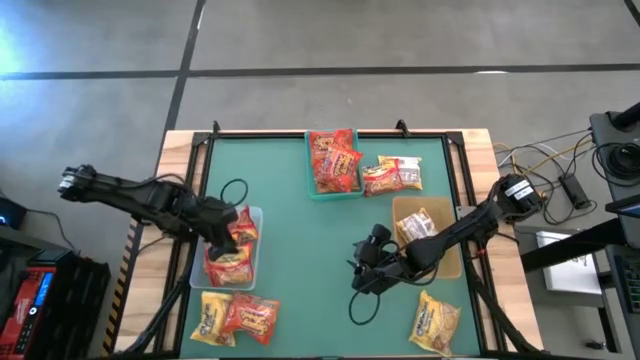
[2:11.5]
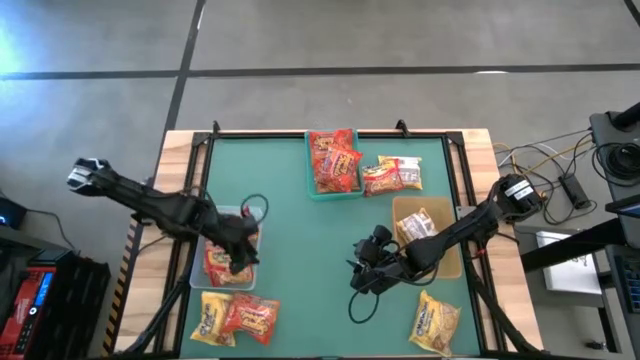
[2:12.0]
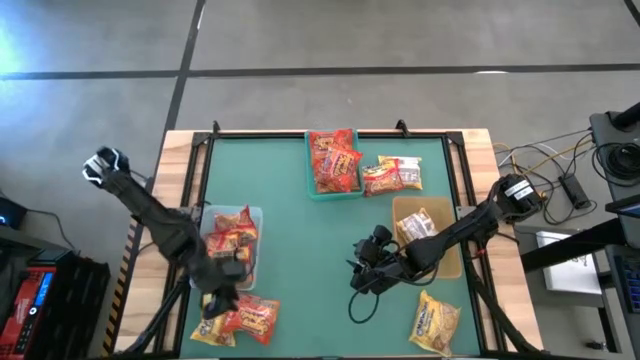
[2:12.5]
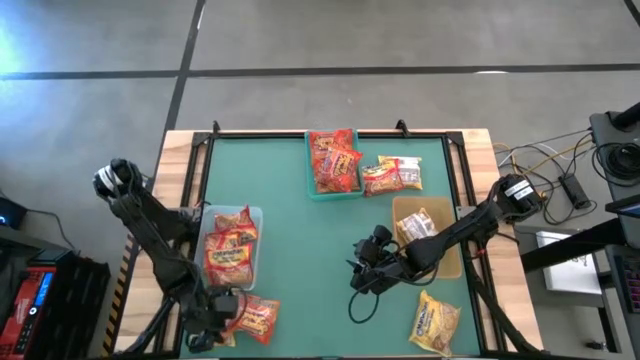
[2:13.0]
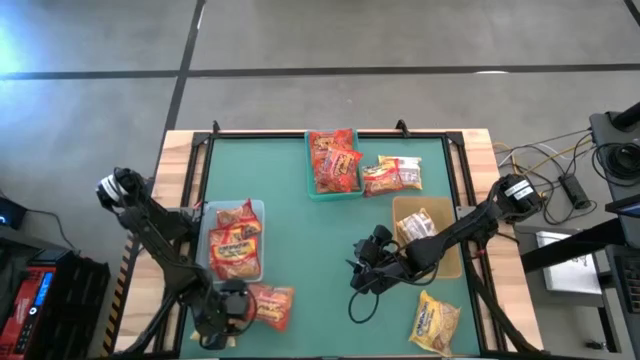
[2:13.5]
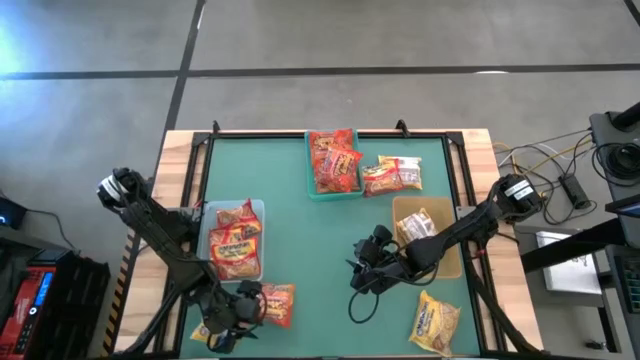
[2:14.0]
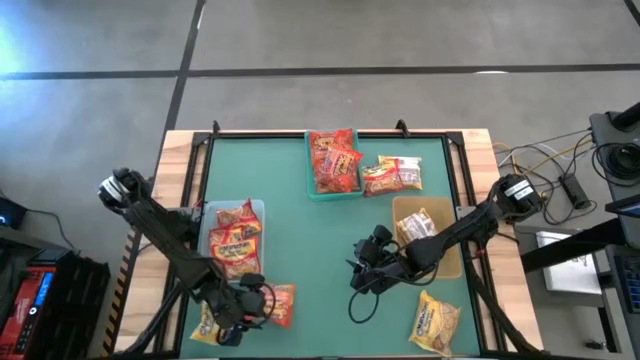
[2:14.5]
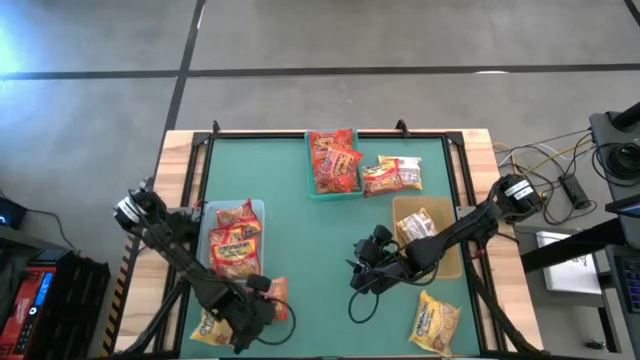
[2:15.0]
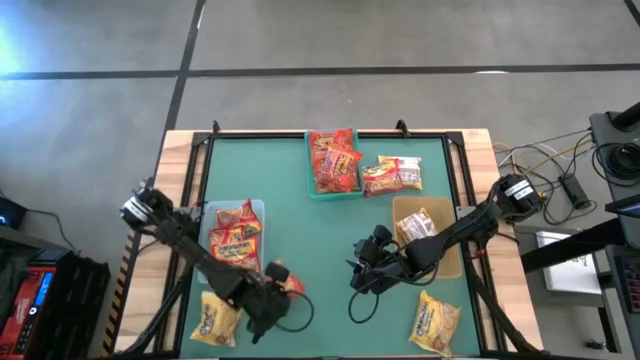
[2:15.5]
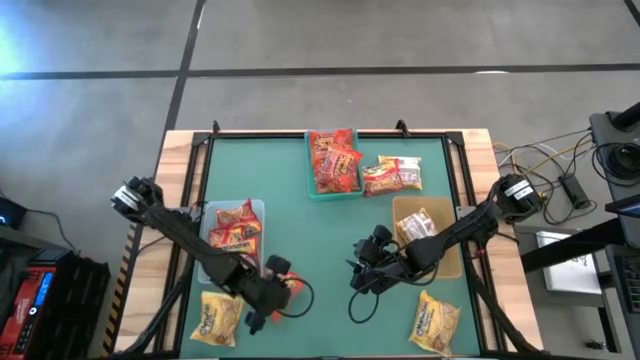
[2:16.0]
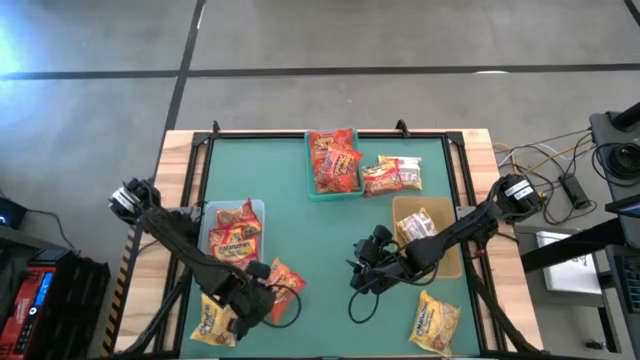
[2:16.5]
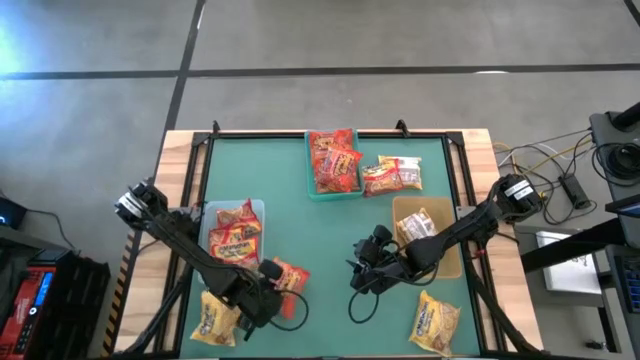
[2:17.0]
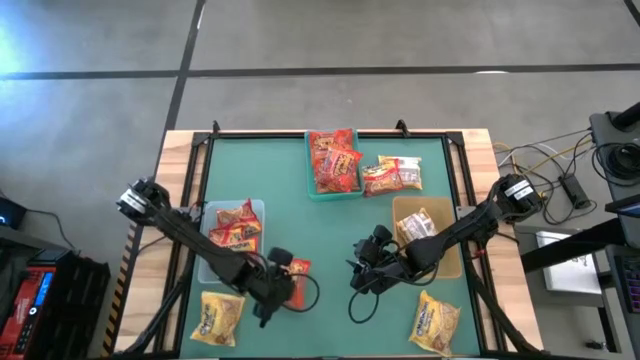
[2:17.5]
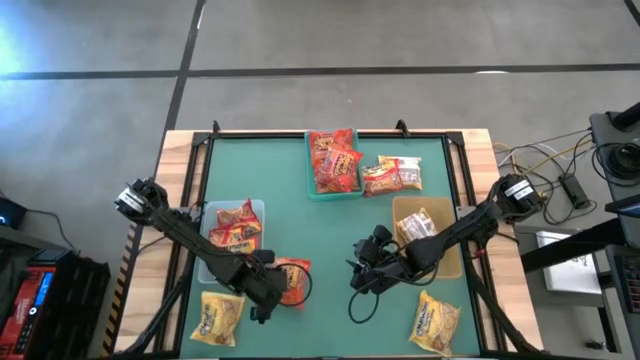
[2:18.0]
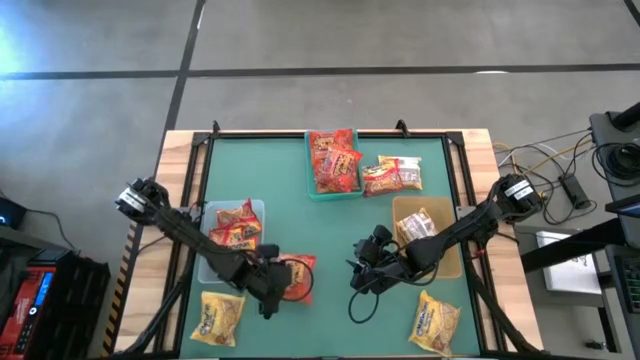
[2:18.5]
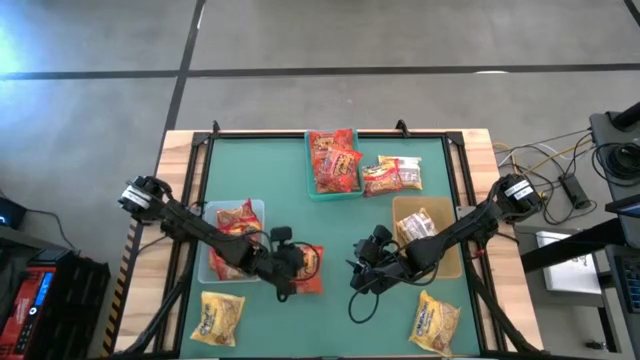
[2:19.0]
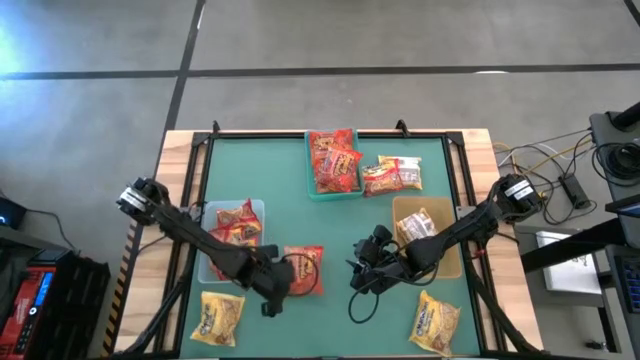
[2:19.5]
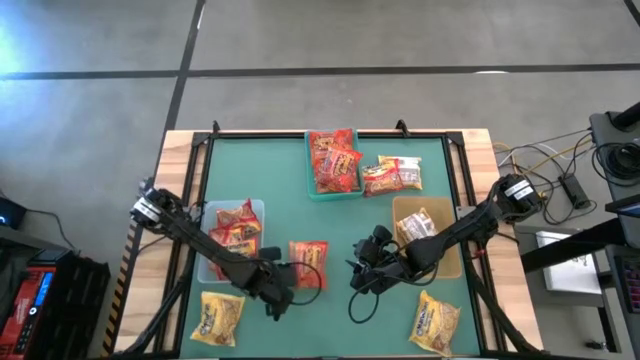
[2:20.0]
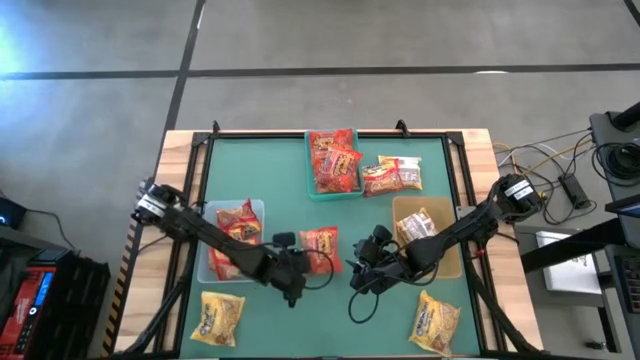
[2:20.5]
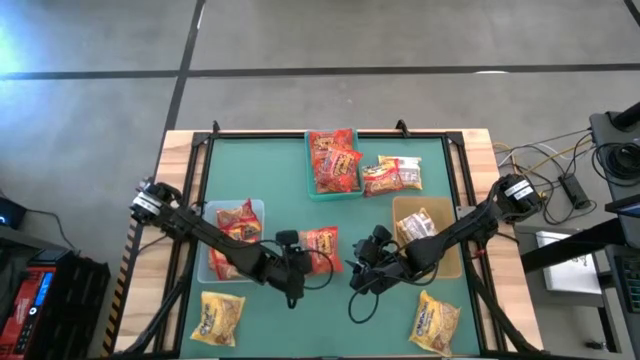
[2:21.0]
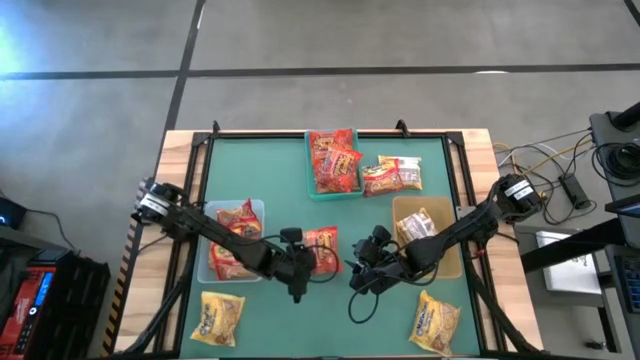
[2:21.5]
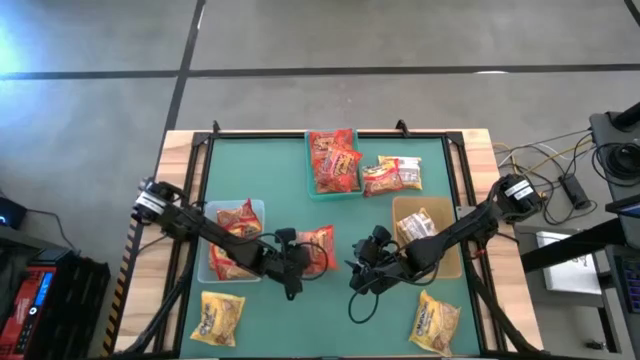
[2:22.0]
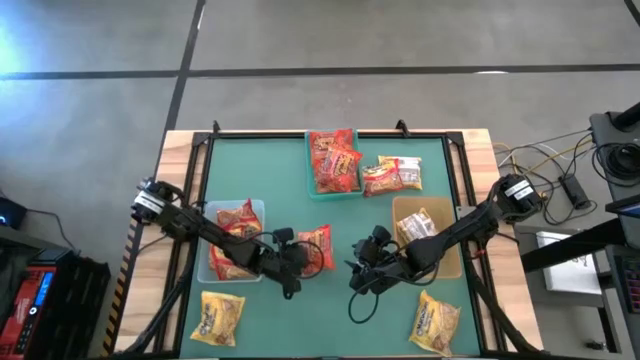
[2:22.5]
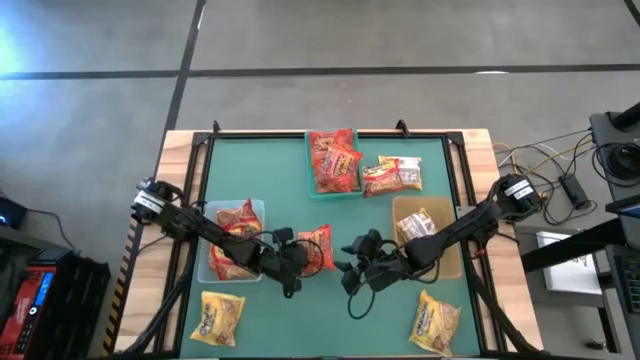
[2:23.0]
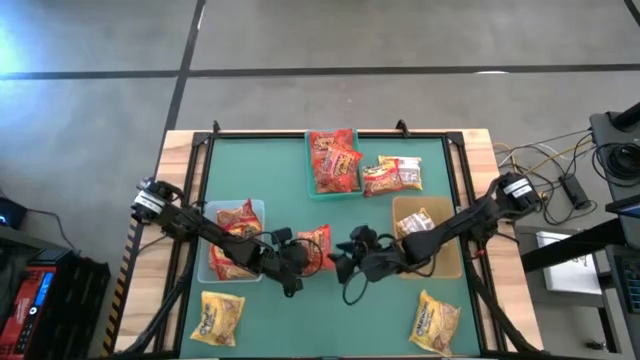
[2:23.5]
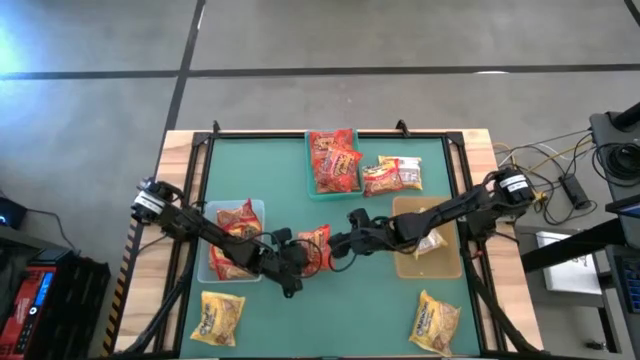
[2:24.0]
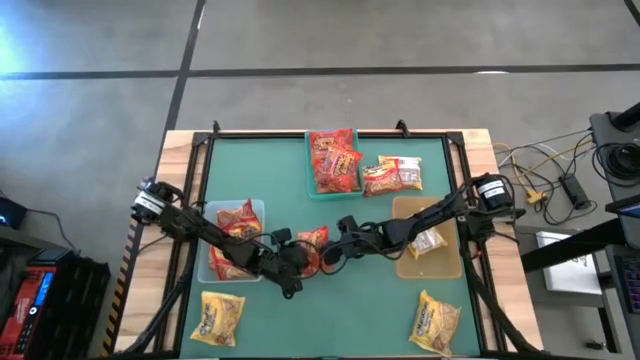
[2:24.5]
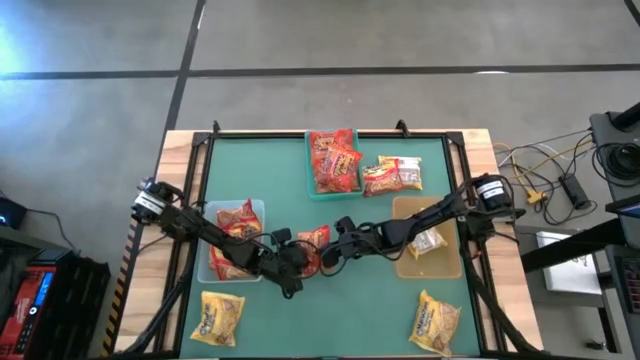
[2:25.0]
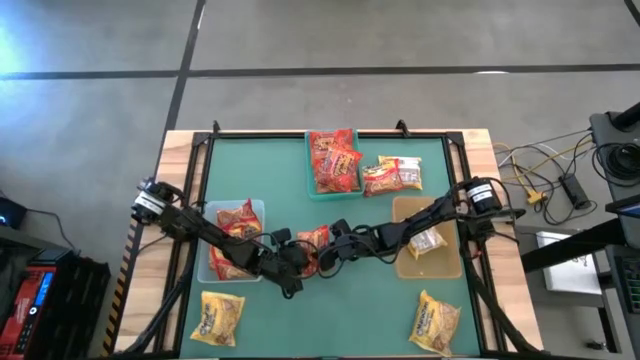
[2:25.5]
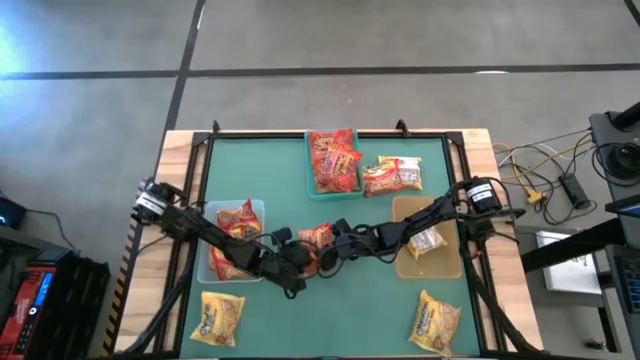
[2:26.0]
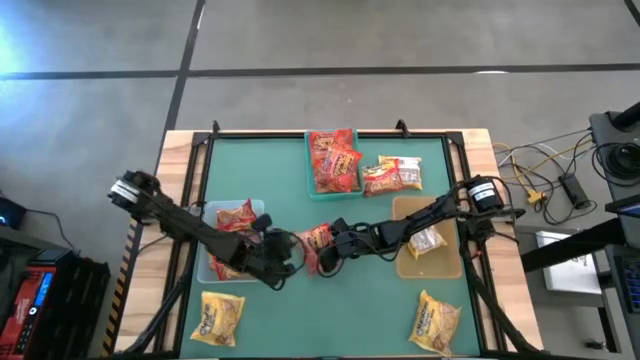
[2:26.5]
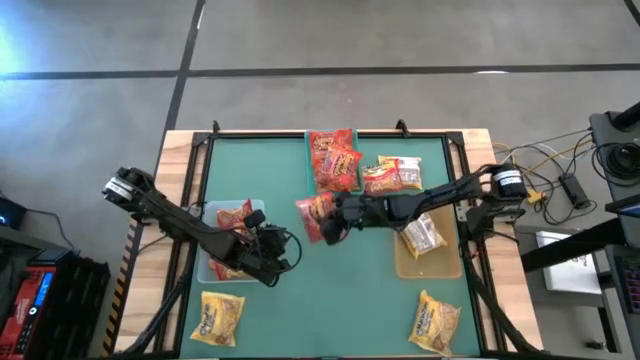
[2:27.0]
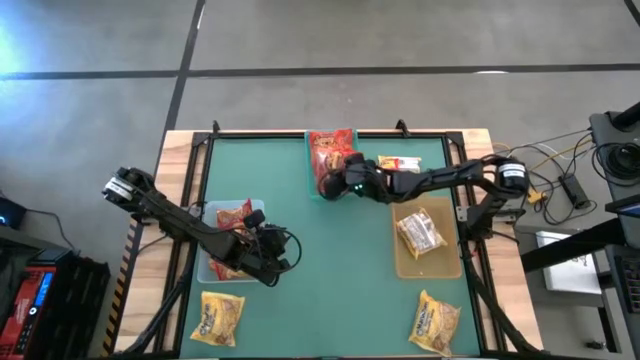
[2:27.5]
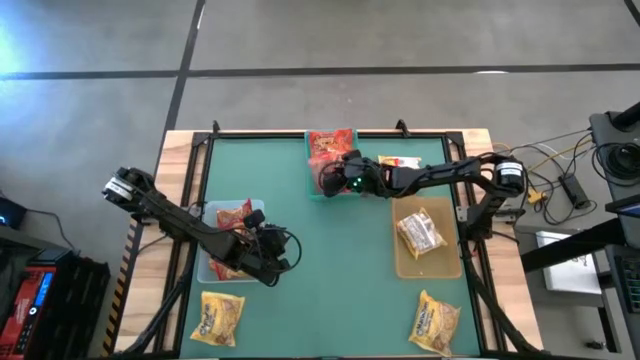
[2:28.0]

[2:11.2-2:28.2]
Task: Sort Maruchan noodles
Put the orange noodle pack into the blue bin

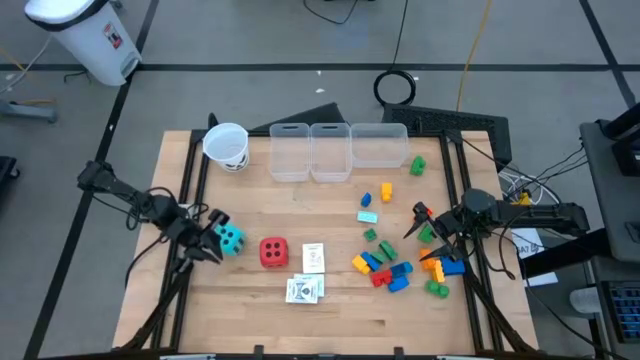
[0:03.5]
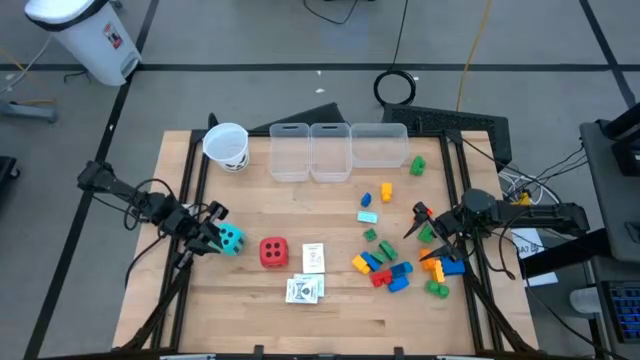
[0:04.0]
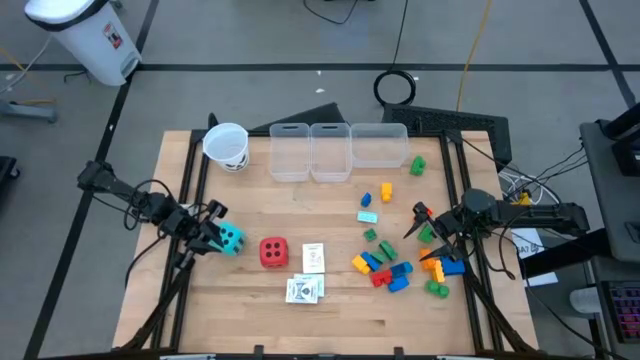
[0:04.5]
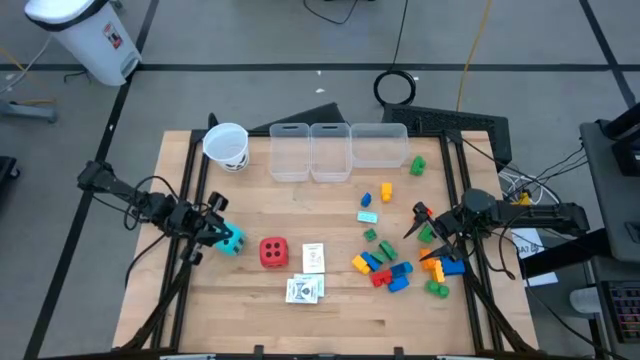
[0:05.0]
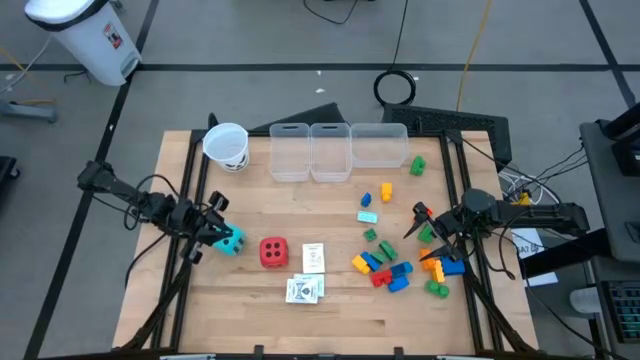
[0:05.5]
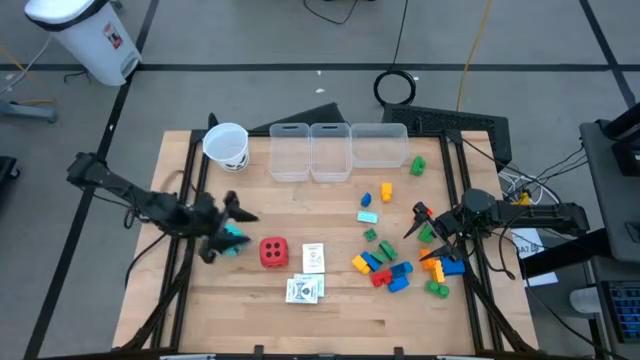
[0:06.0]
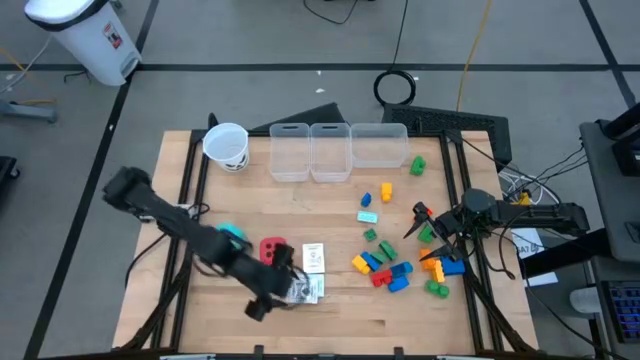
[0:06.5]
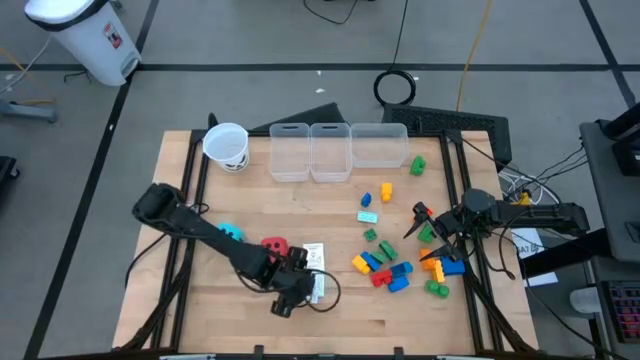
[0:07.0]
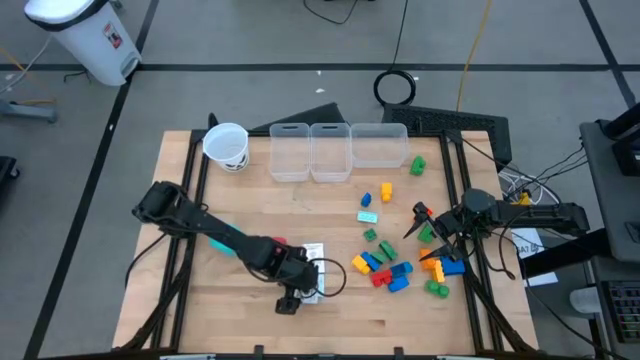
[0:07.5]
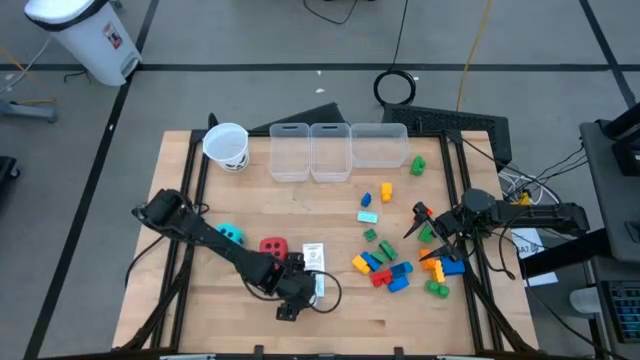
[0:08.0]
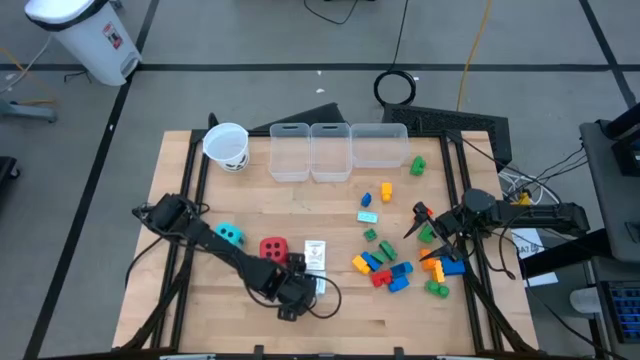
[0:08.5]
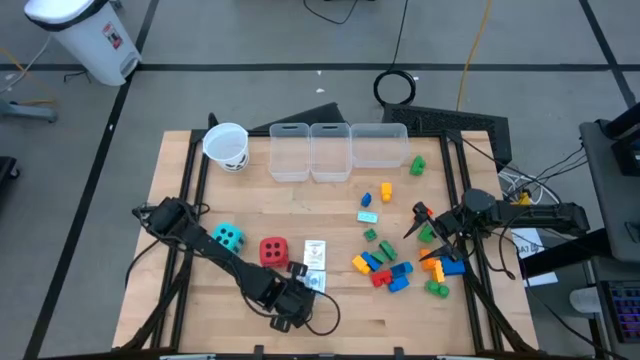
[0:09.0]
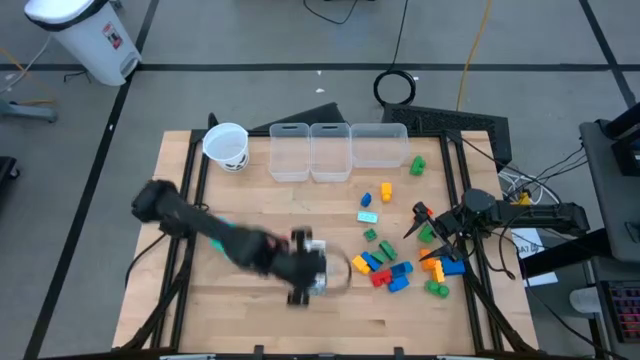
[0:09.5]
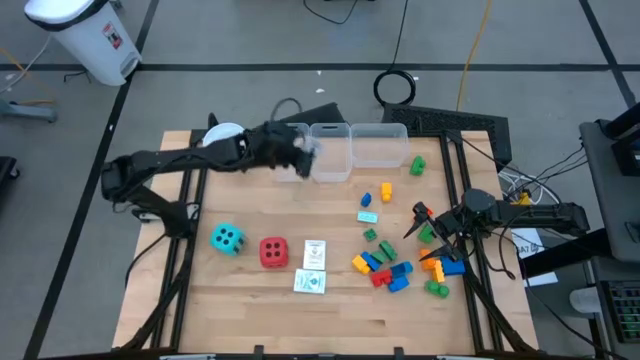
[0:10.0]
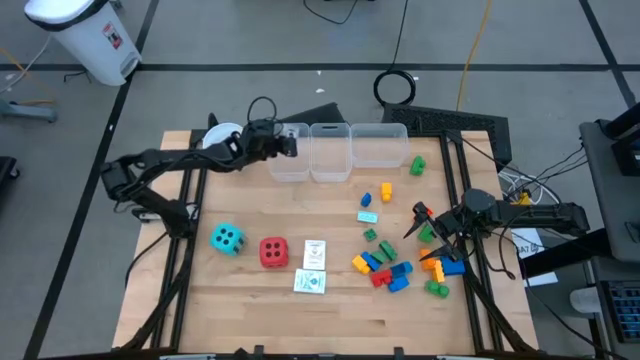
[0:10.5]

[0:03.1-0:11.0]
Task: Pick & Place Toys
Put the black deck of cards into the left transparent bin
